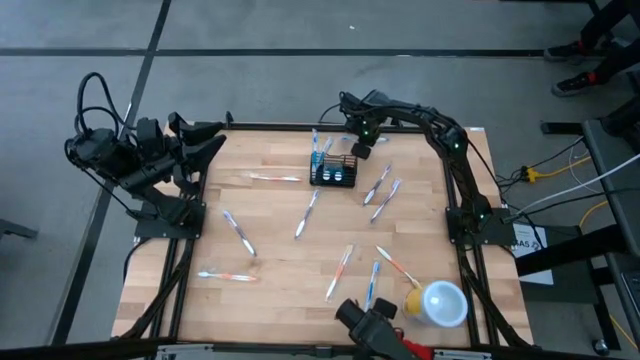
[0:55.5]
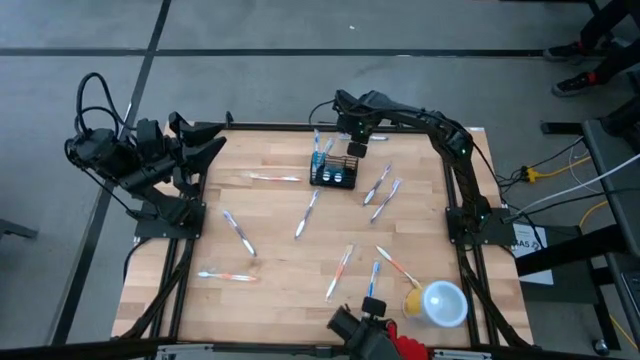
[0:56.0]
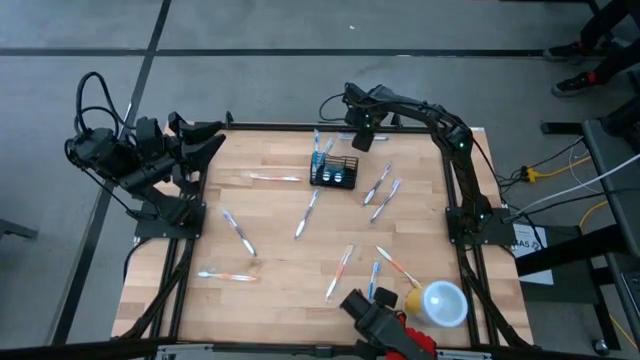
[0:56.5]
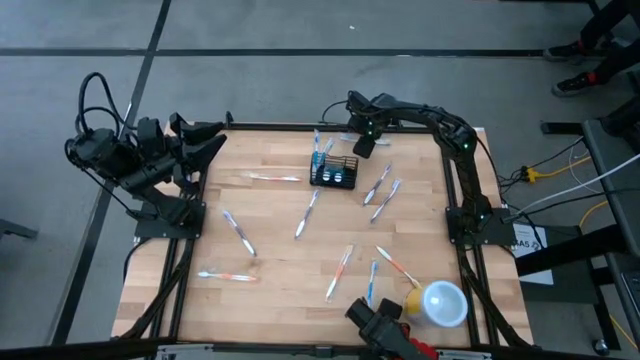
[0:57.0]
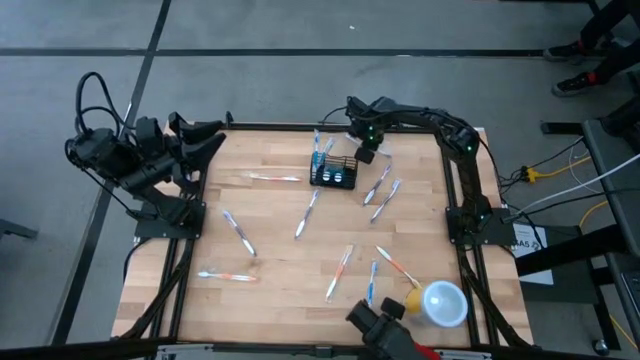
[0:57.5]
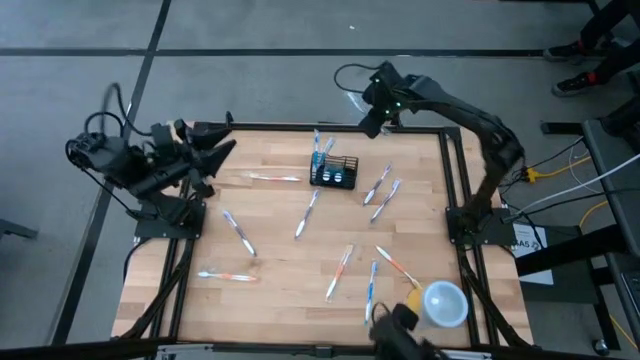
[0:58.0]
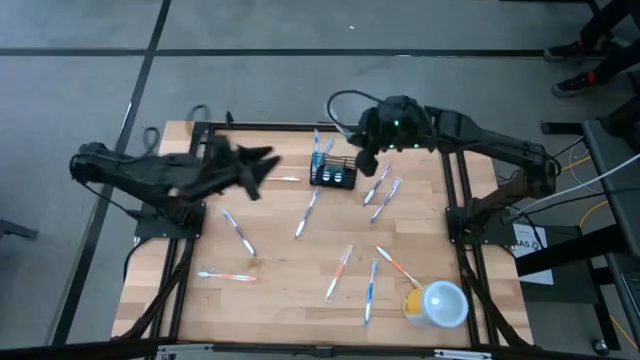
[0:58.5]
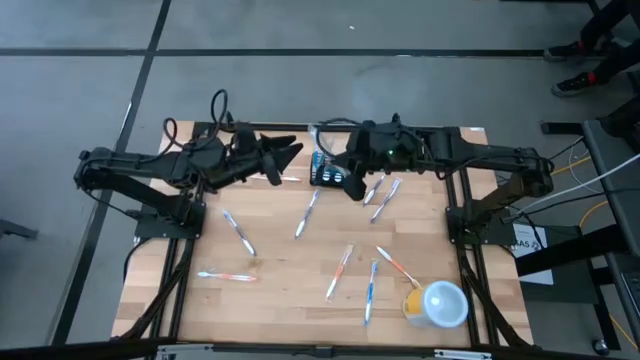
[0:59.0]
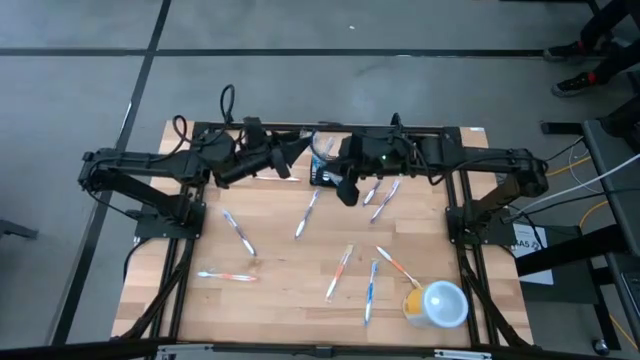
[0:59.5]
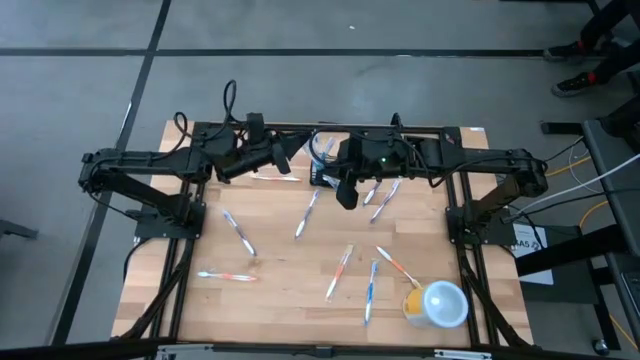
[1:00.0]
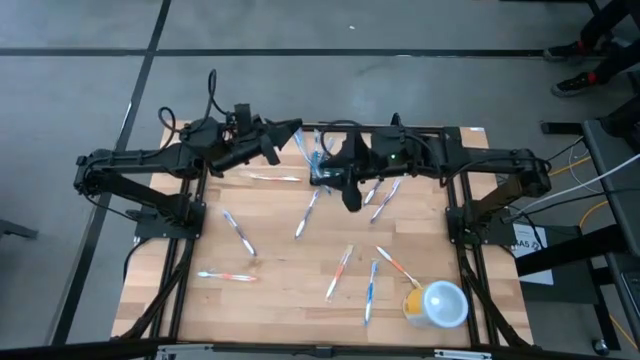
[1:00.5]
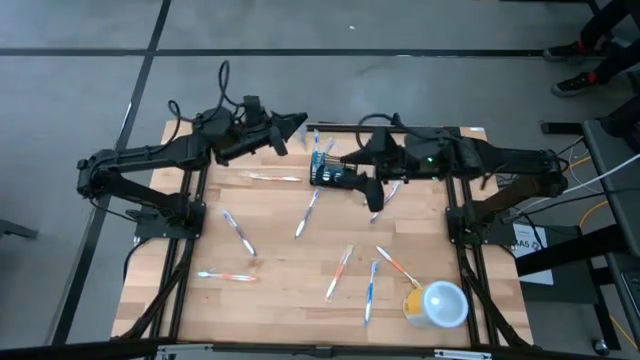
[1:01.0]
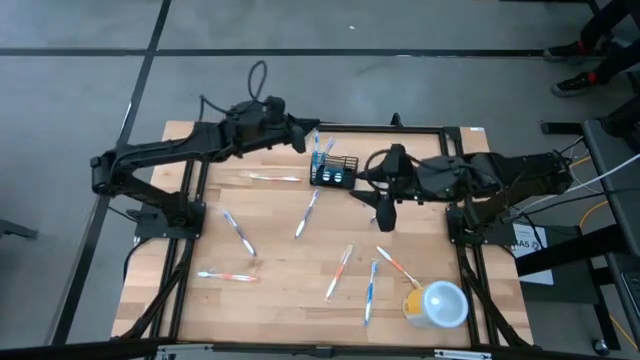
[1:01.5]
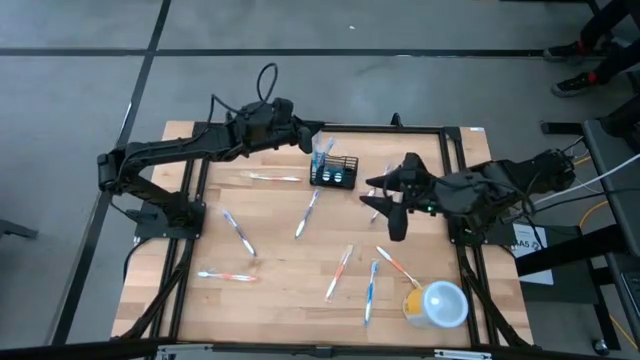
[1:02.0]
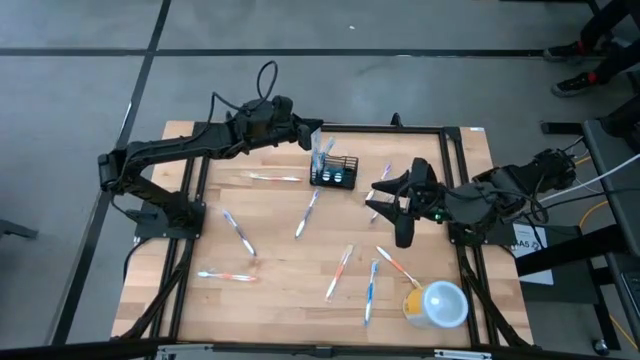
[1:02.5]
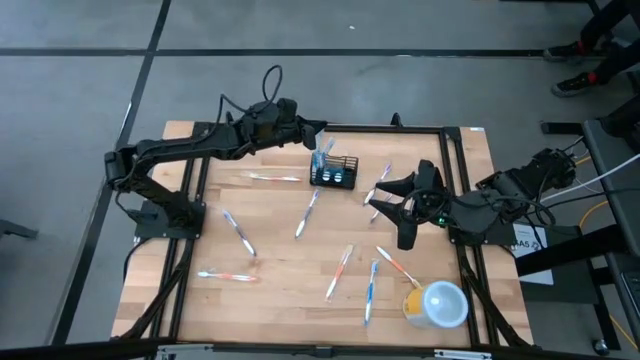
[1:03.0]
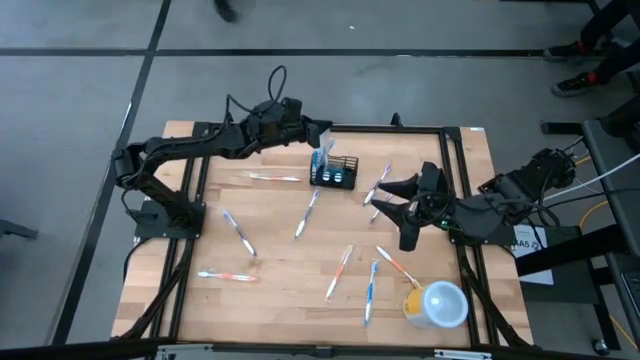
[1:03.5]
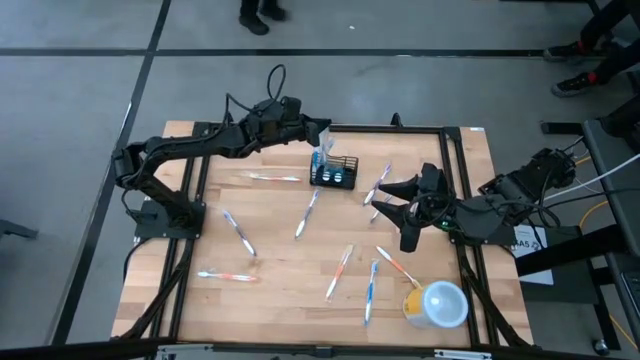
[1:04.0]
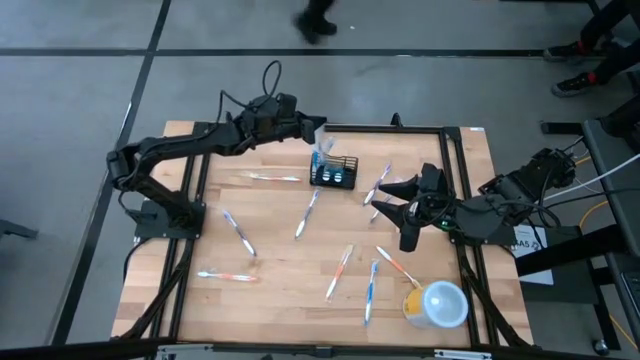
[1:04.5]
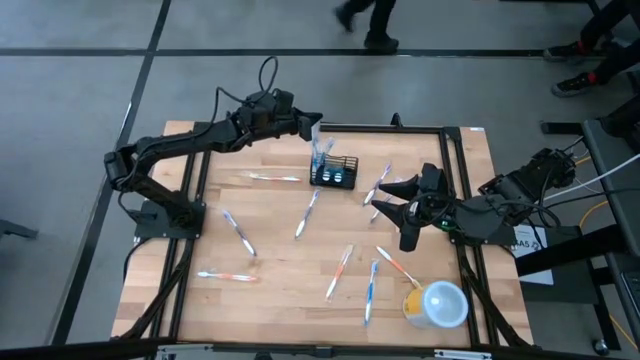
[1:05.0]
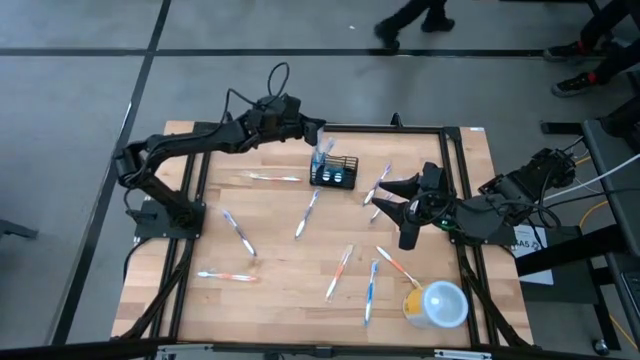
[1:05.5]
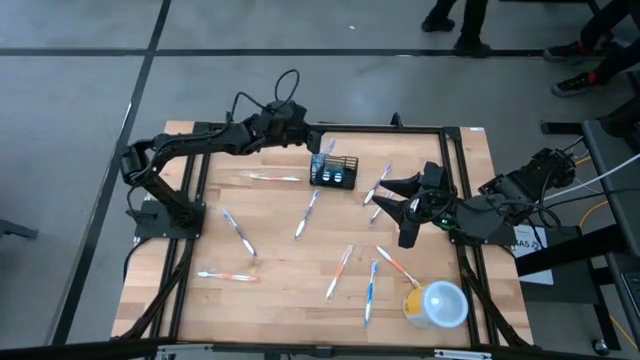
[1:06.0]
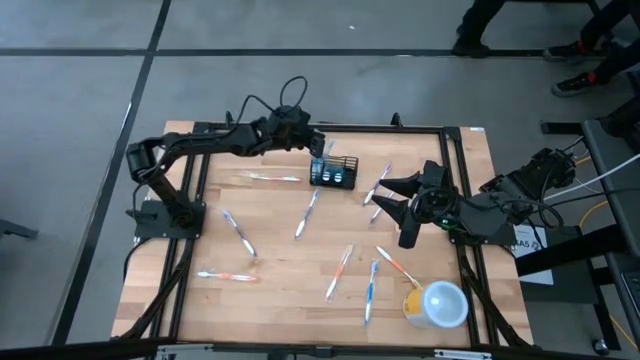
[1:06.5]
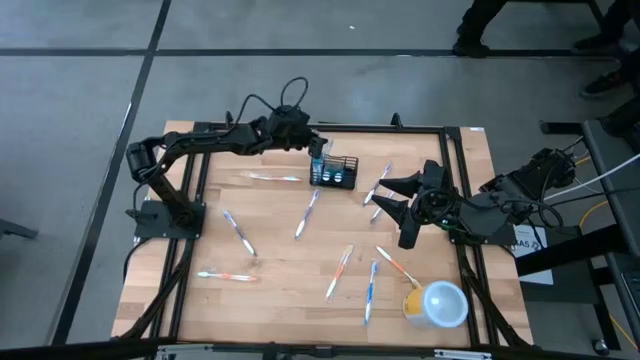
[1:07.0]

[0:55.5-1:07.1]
Task: Pick & Place toothbrushing station
Put the top blue toothbrush into the left section of the mesh organizer

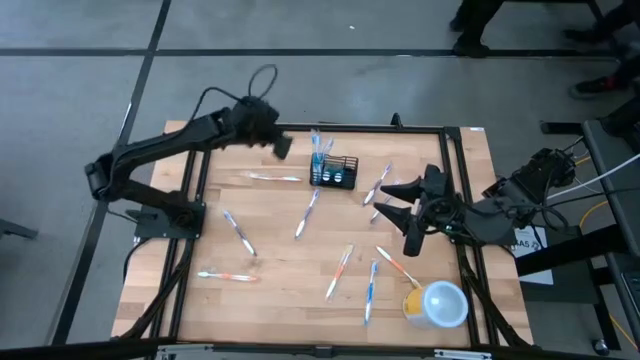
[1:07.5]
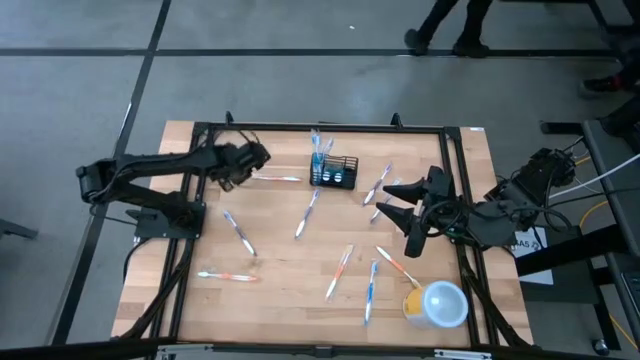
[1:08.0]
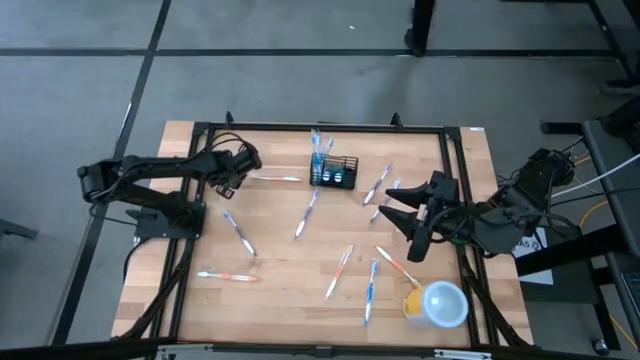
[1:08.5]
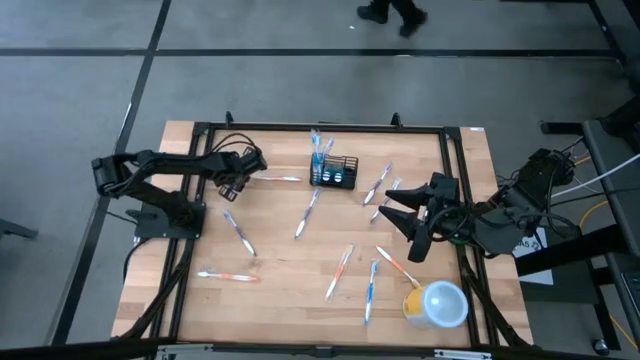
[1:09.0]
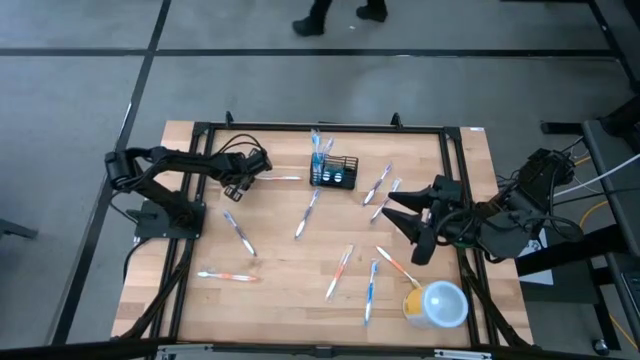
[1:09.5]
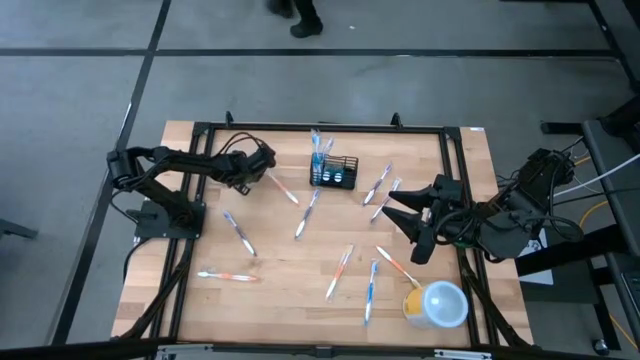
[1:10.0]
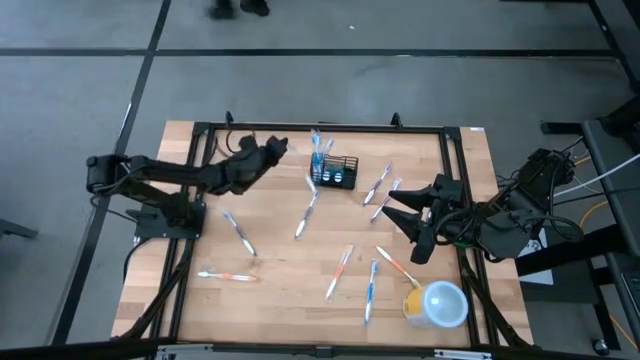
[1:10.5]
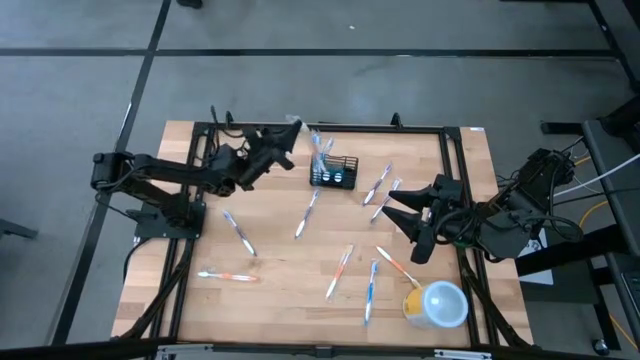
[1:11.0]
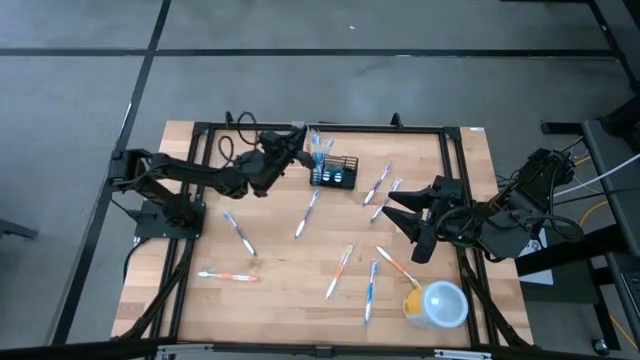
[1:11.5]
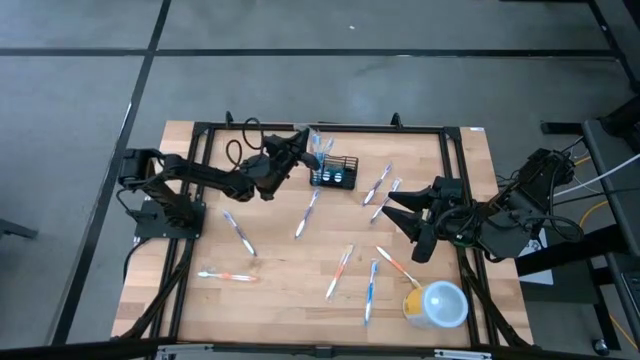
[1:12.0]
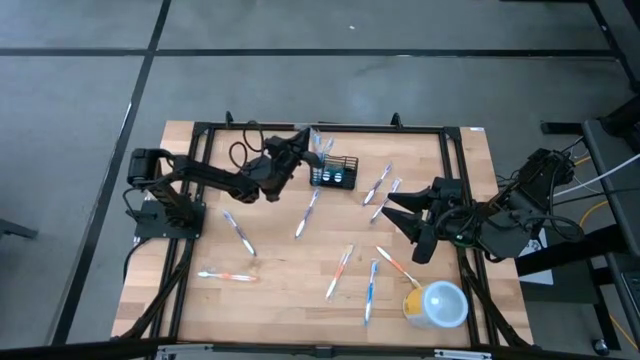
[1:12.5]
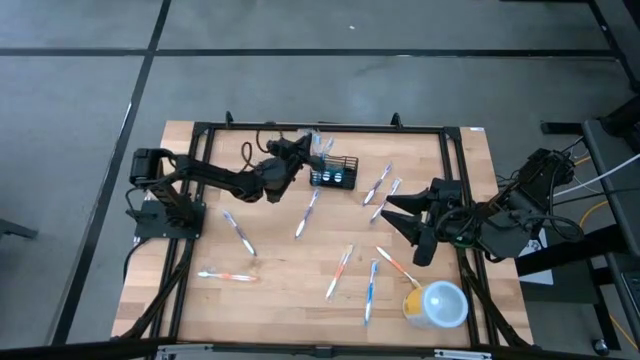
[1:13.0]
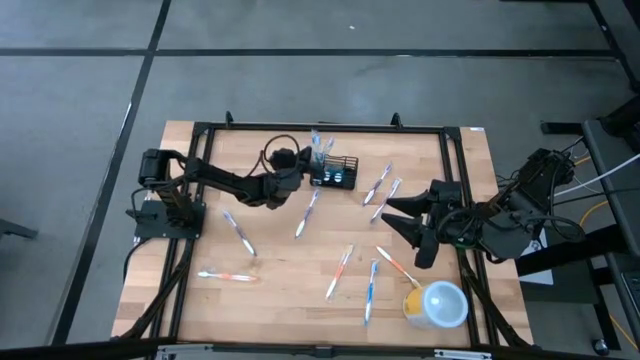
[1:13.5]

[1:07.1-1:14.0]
Put the orange toothbrush into the left section of the mesh organizer

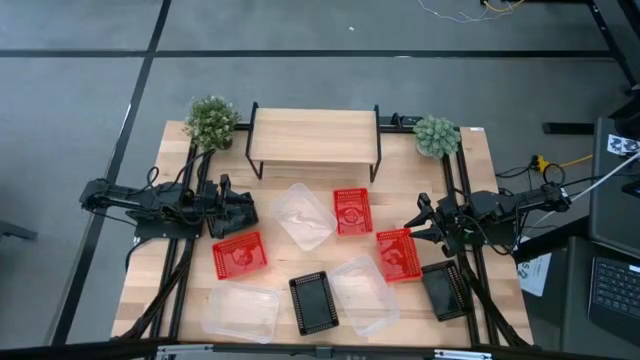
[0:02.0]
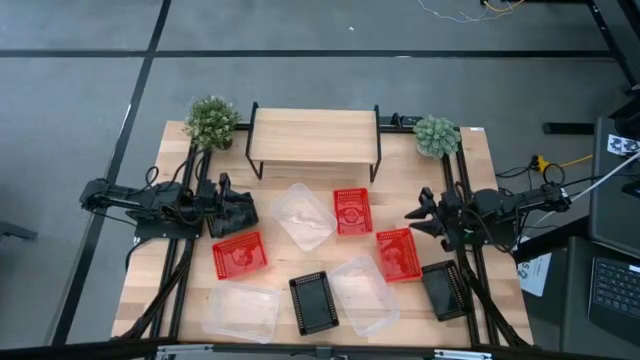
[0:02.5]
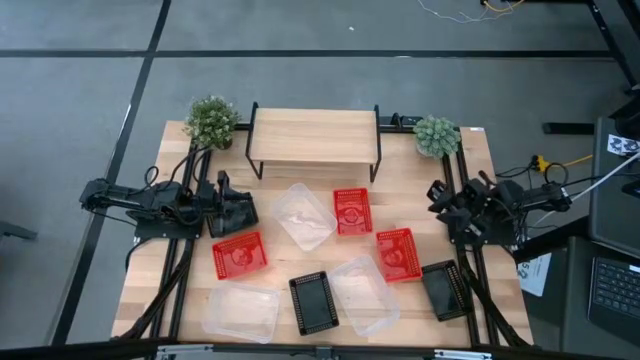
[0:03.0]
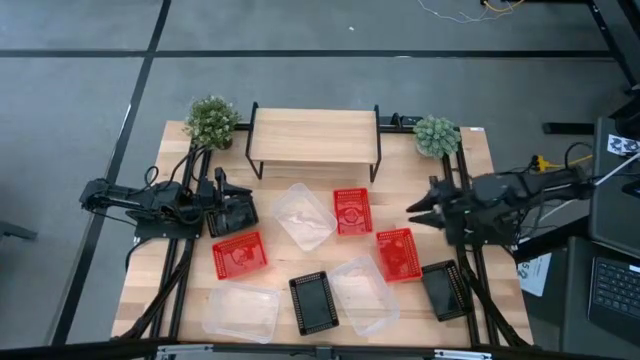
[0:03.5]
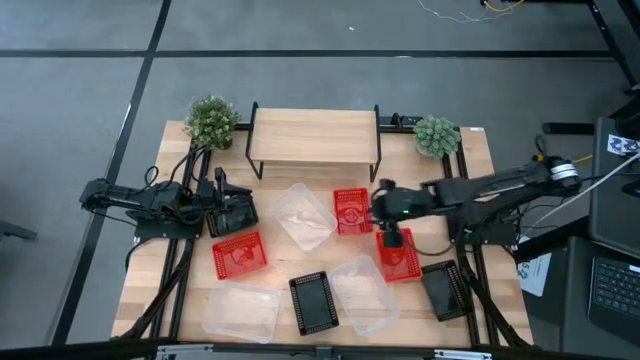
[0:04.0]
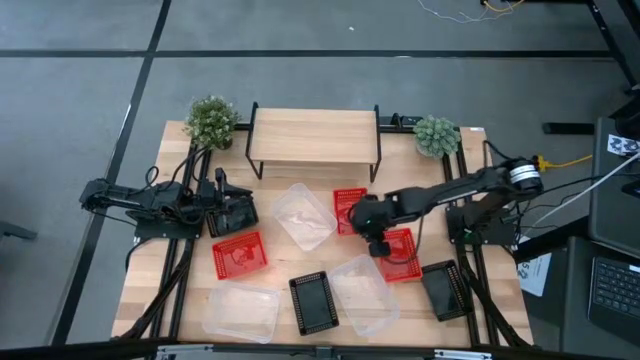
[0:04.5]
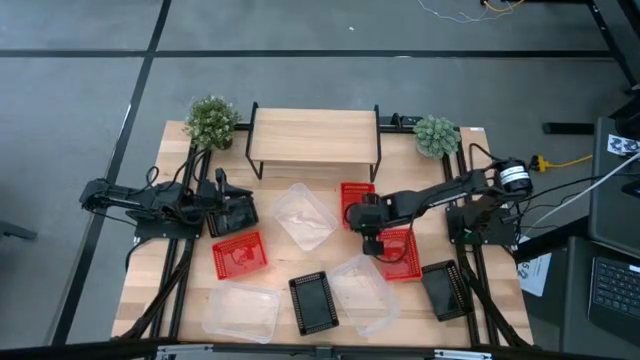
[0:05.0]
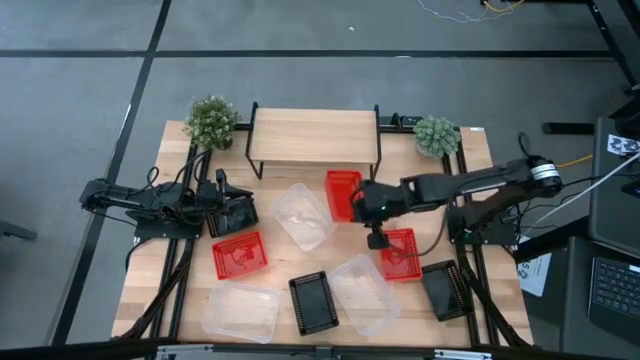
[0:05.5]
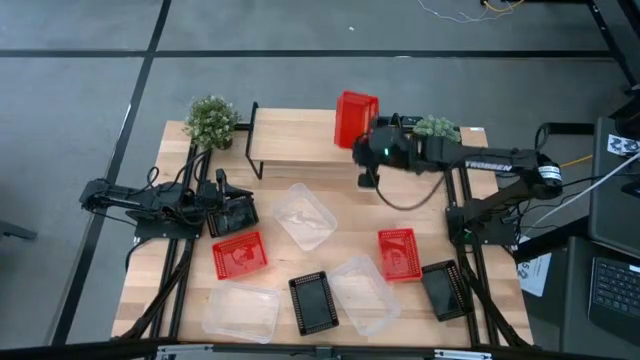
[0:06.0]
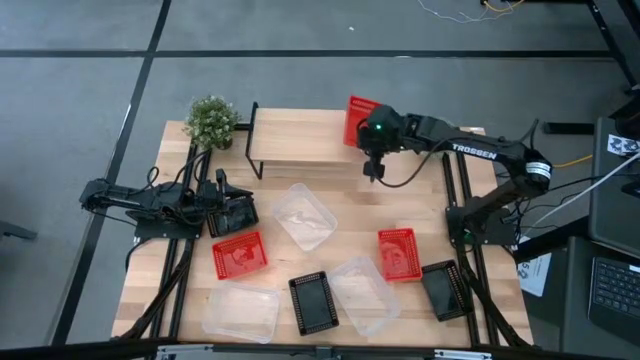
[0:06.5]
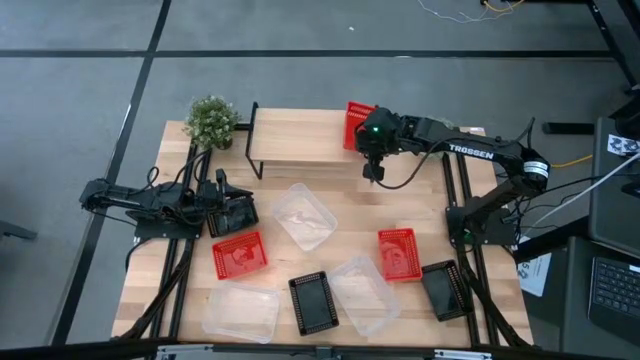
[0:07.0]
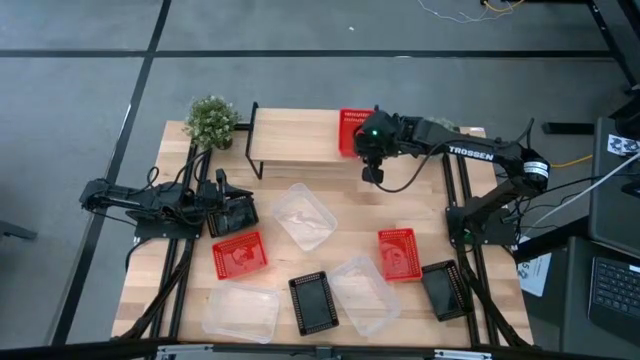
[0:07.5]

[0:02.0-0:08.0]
Task: Stack baskets on shelf by color
Put the top red bin on the shelf
